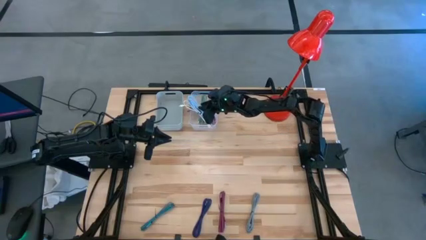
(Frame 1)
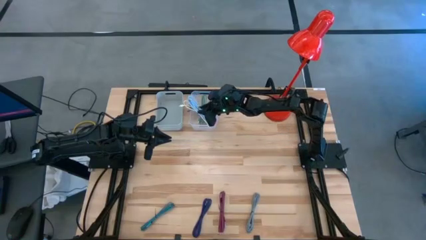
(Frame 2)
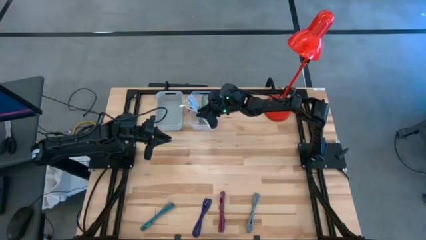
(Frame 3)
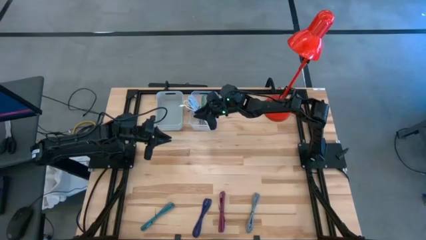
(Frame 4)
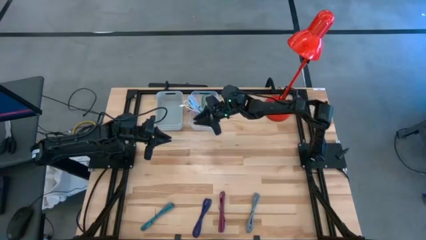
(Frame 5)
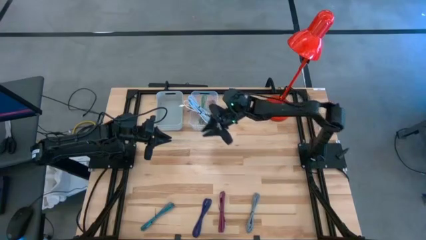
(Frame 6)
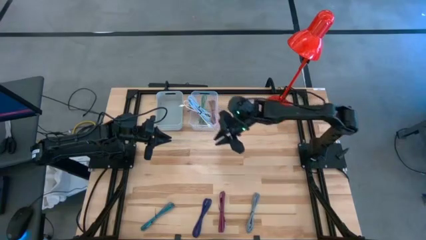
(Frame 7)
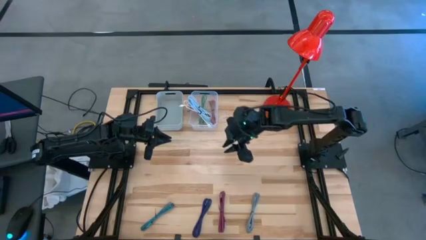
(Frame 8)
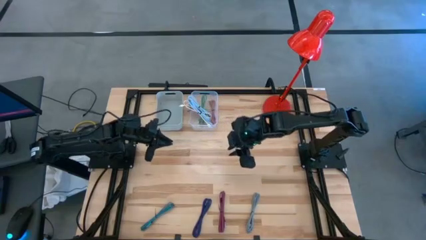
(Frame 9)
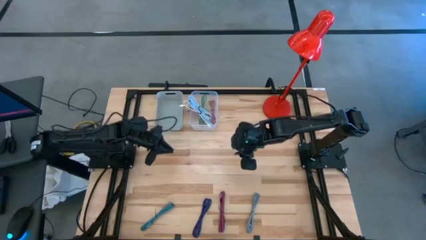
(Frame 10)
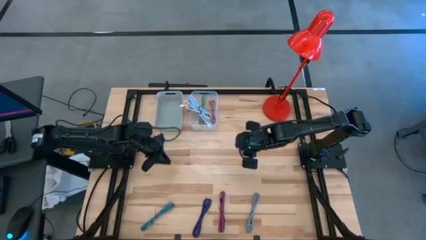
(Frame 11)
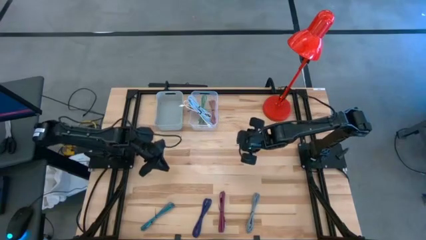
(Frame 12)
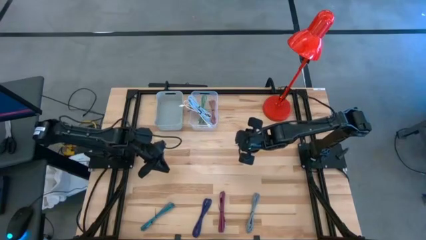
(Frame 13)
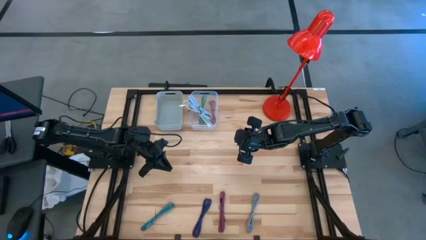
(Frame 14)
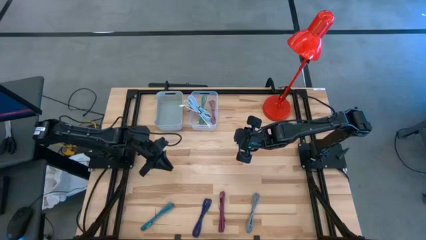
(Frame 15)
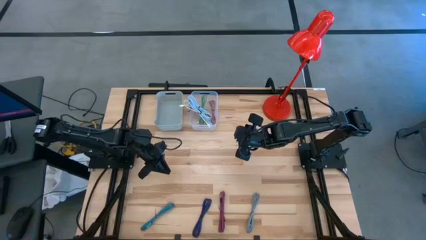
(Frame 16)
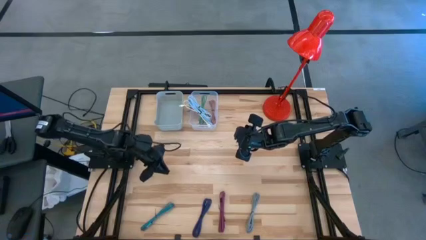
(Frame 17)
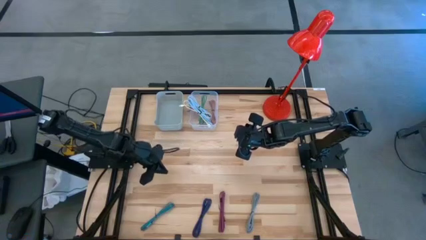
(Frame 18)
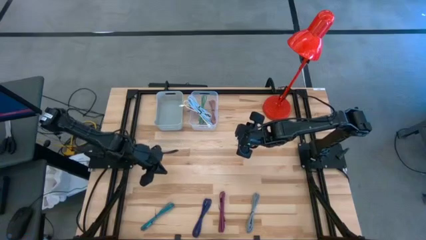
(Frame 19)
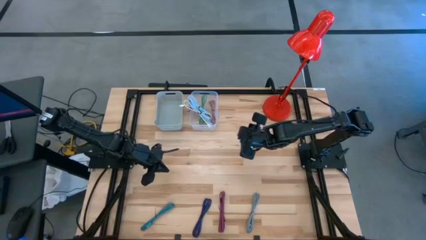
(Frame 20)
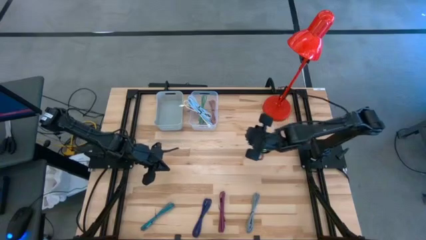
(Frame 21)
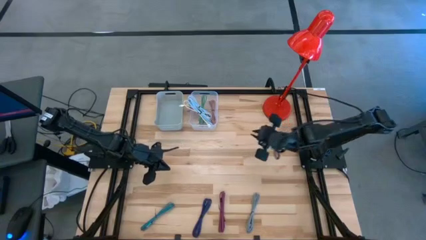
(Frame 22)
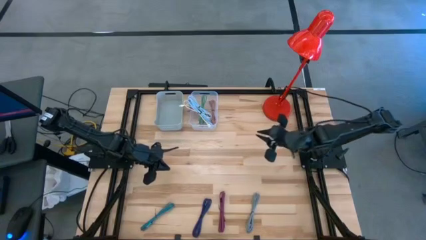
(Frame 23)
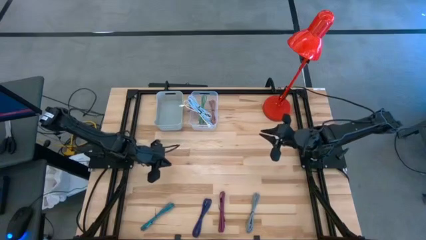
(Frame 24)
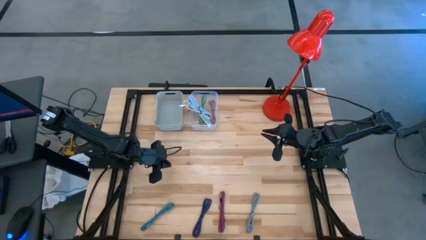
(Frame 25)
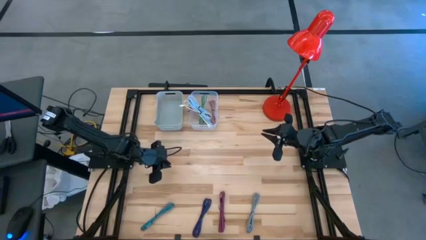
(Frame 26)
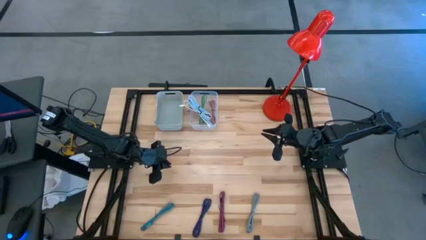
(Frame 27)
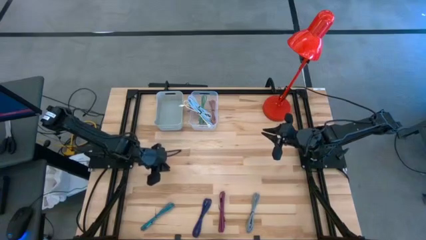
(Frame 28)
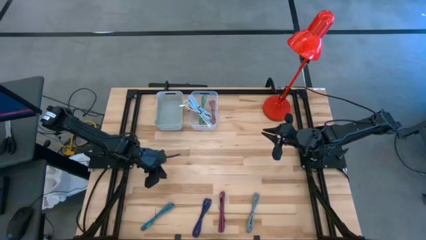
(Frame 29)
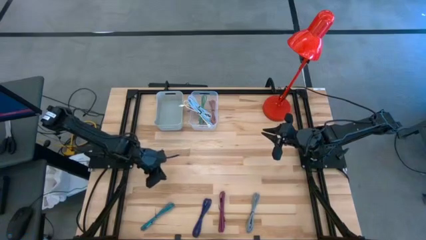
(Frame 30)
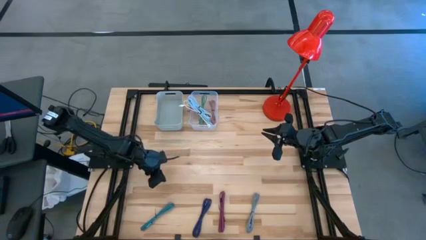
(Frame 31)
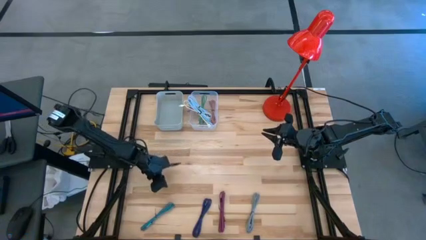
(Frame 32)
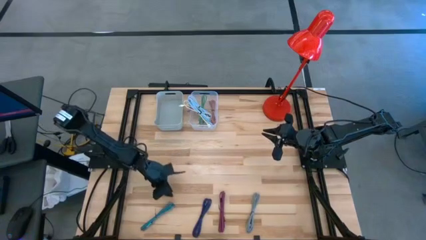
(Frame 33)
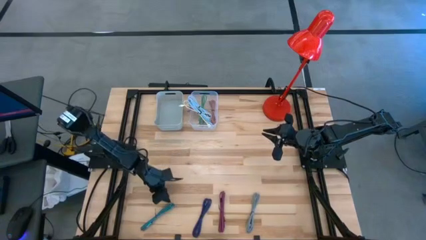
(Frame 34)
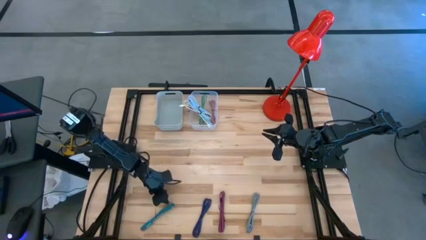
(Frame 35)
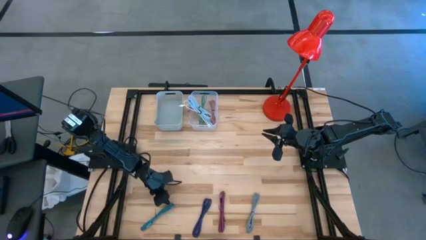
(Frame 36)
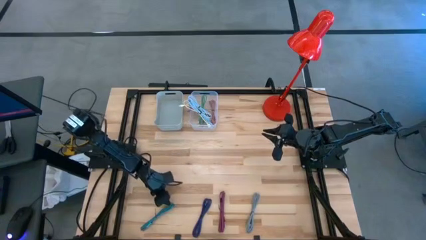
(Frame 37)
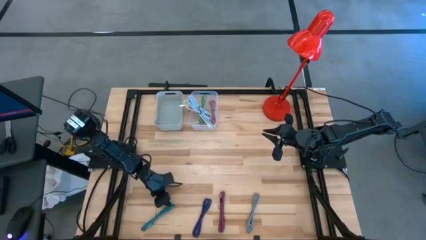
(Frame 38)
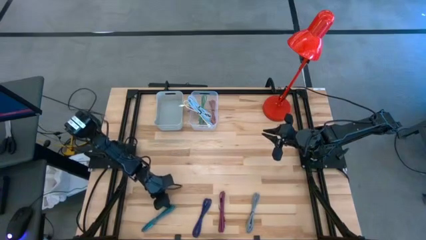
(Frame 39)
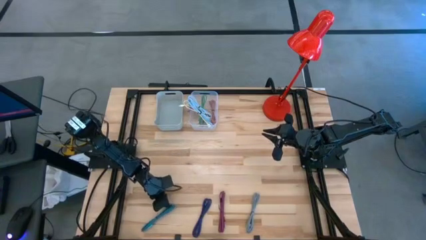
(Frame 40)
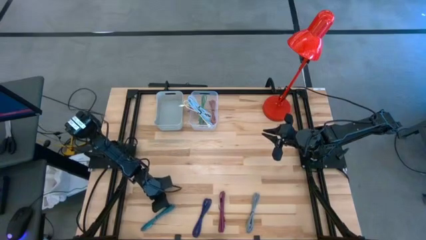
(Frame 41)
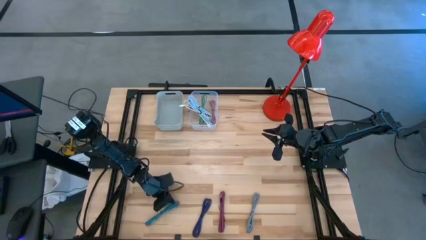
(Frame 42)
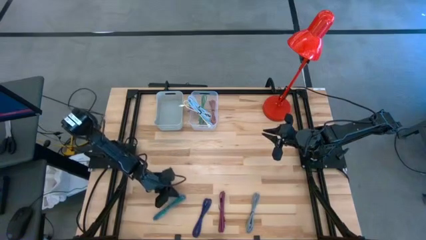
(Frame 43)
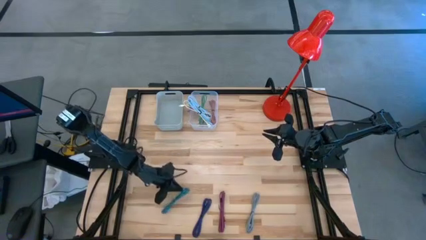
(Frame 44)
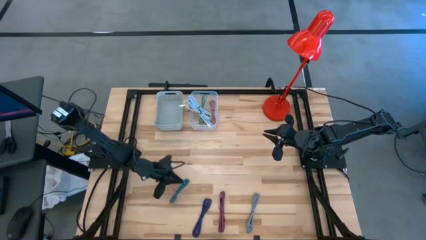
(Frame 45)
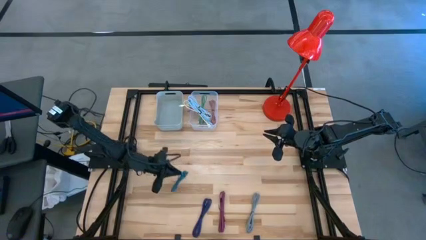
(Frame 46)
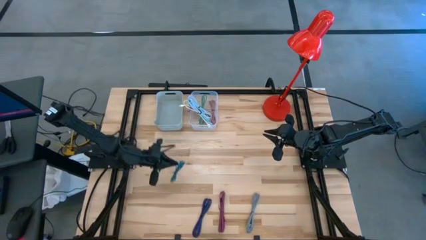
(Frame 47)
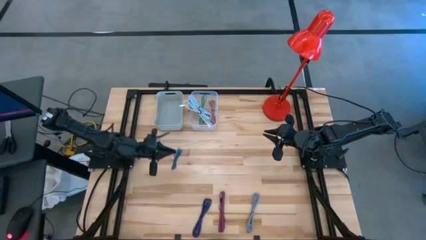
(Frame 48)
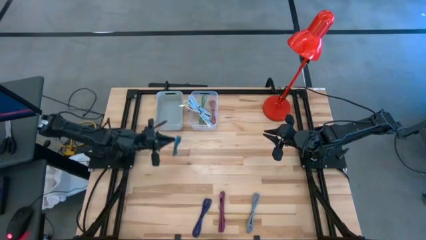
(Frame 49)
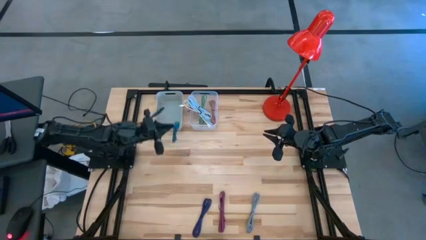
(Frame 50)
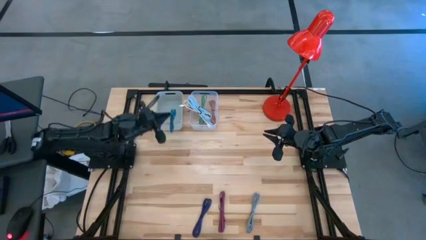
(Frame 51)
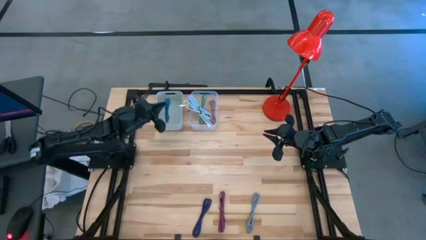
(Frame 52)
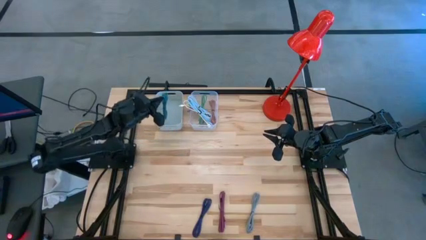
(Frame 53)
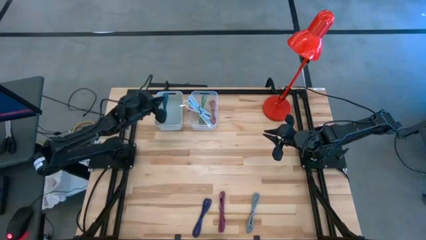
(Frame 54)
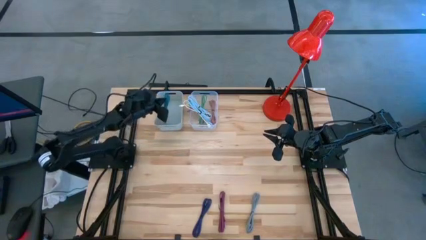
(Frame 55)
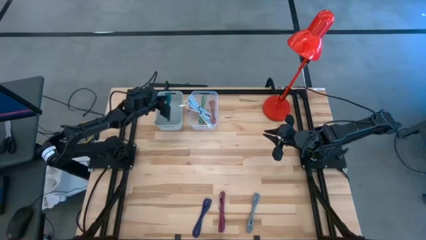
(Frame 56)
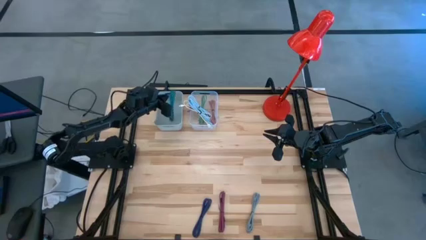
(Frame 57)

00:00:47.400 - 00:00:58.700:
Task: Pick & Place USB Port
Put the black and blue charge cable into the gray bin

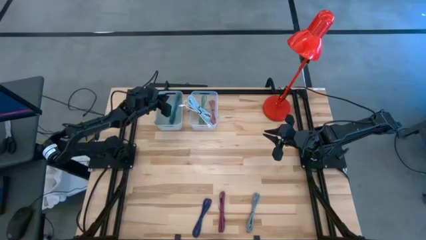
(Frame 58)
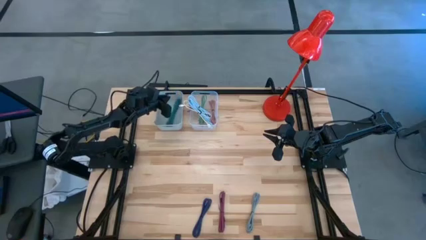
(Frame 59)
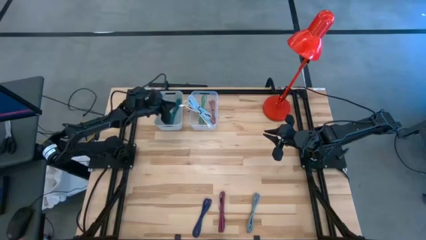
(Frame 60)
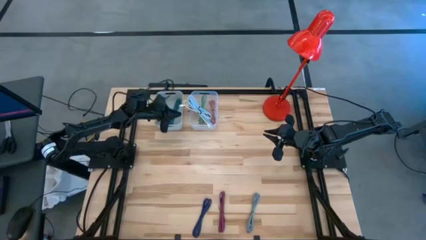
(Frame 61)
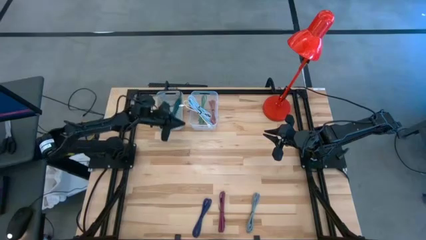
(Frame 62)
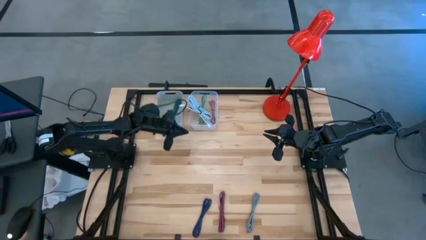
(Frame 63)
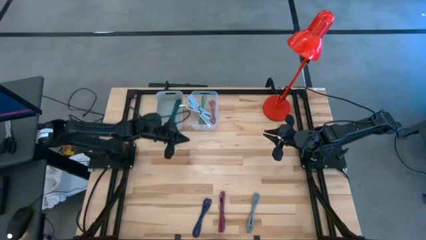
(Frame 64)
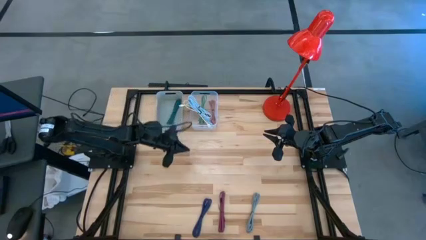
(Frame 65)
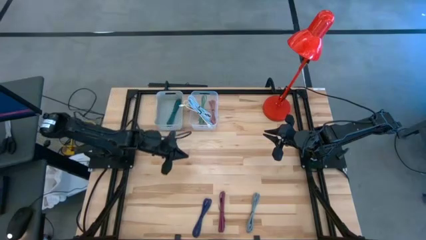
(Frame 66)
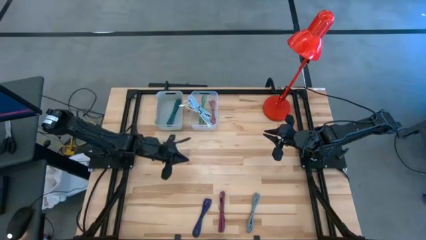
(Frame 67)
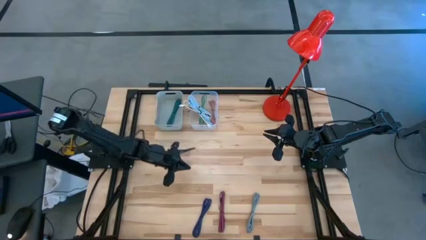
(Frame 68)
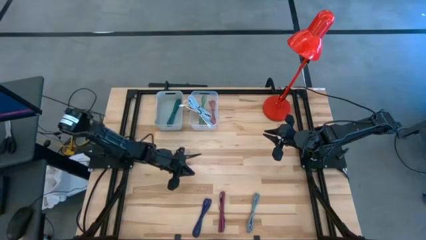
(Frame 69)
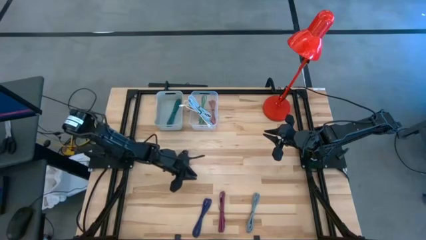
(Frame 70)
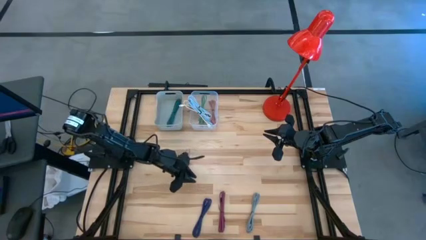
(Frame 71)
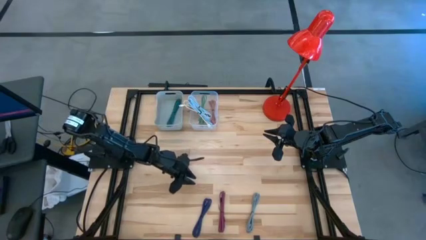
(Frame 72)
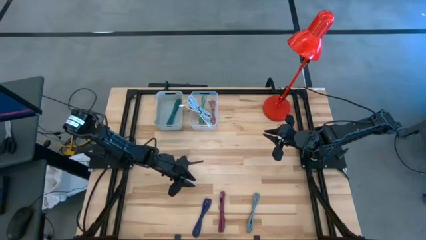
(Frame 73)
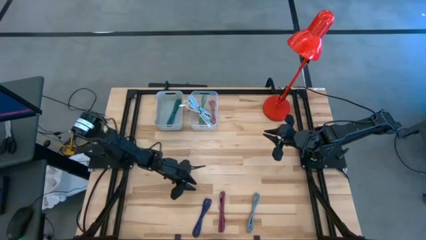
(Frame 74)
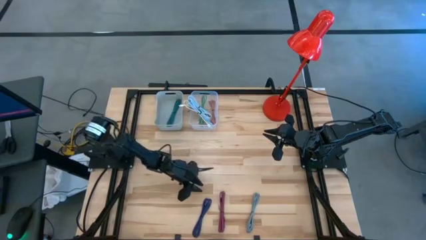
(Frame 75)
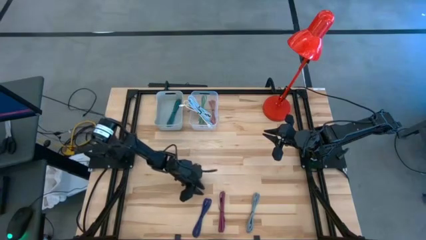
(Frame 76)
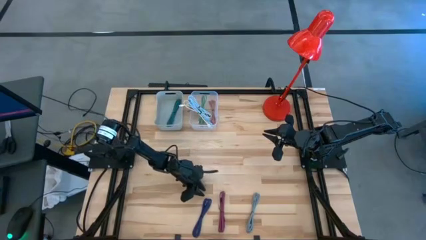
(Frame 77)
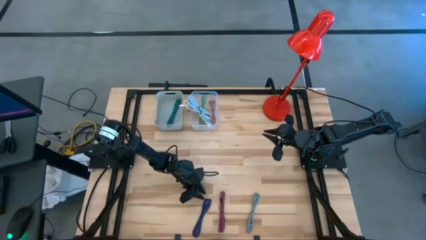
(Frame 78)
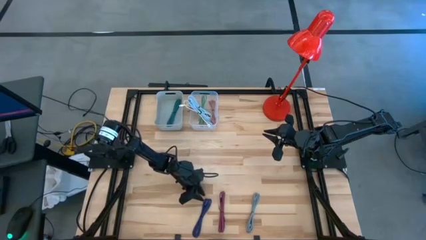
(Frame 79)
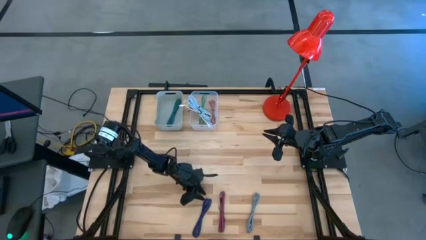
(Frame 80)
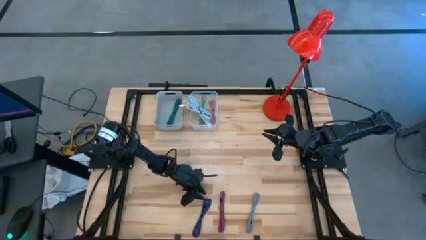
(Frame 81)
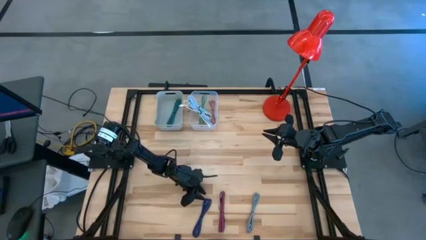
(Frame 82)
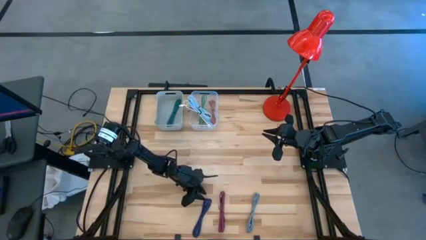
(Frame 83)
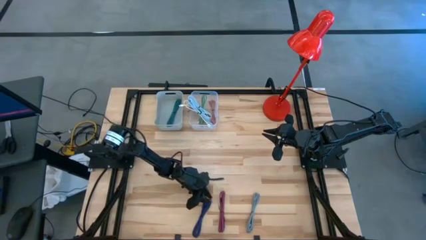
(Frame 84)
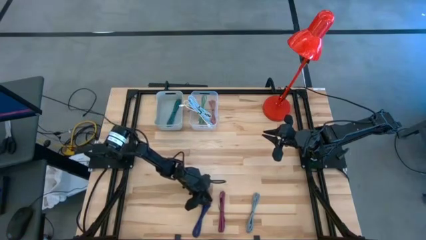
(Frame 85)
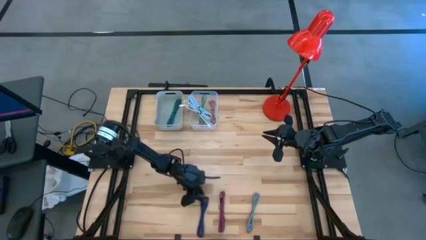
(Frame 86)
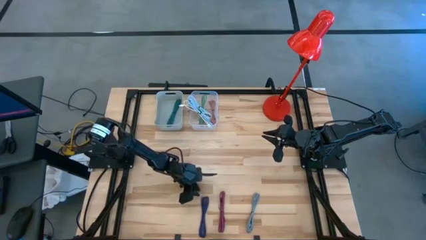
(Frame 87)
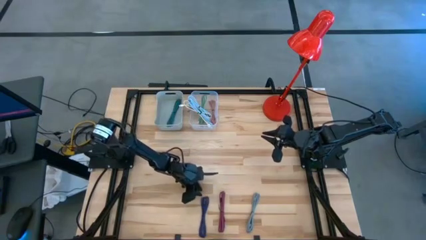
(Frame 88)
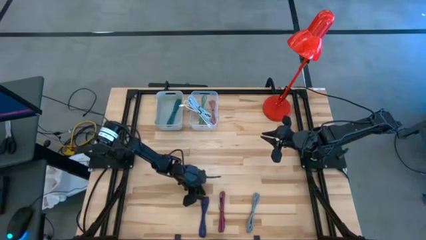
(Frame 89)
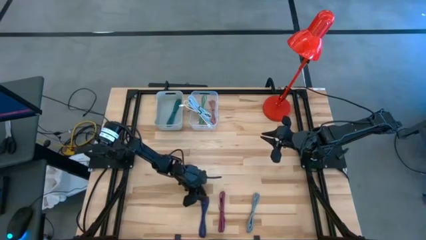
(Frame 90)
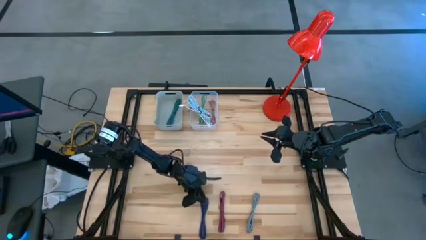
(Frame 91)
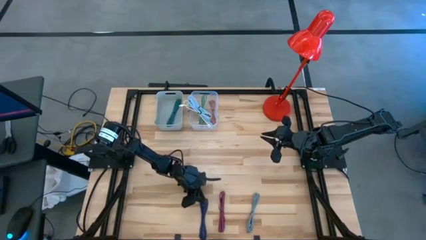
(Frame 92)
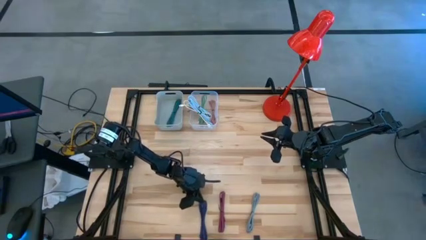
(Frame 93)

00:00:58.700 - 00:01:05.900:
Put the black and violet charge cable into the gray bin
